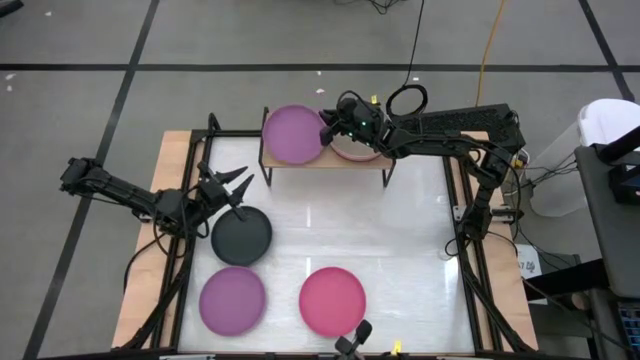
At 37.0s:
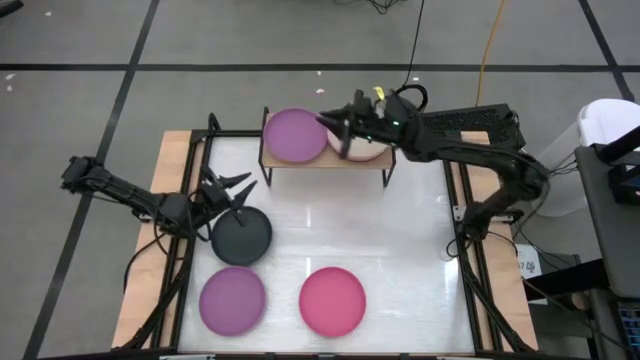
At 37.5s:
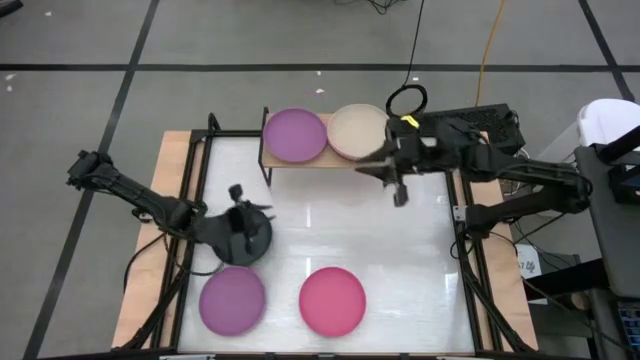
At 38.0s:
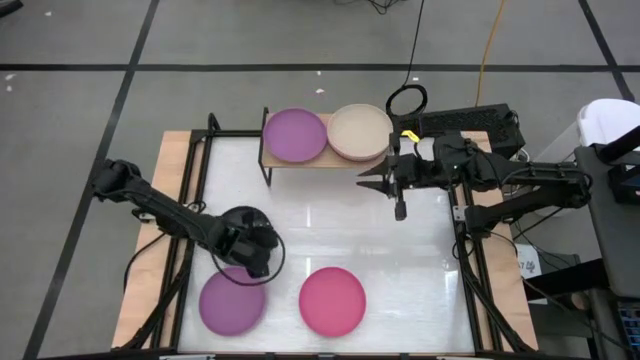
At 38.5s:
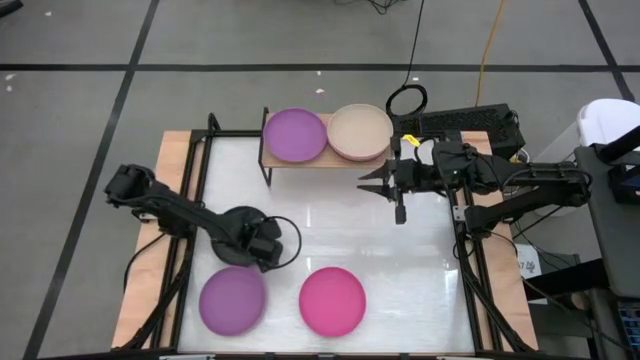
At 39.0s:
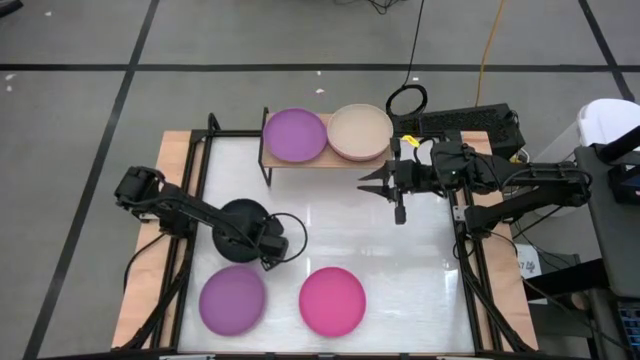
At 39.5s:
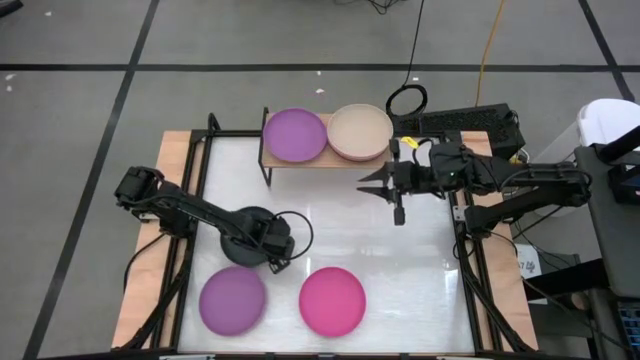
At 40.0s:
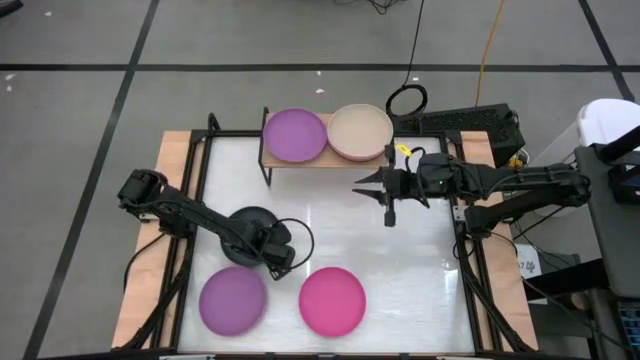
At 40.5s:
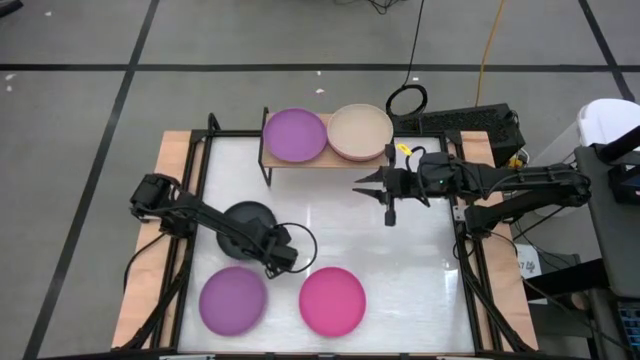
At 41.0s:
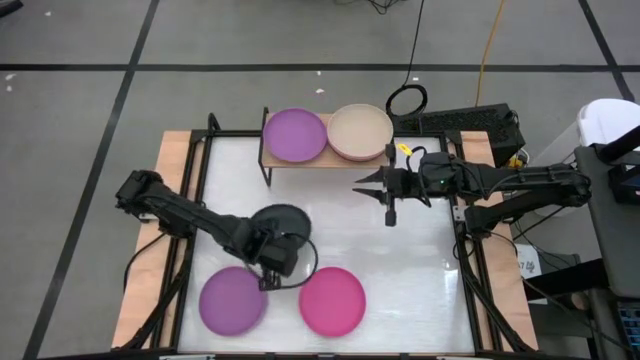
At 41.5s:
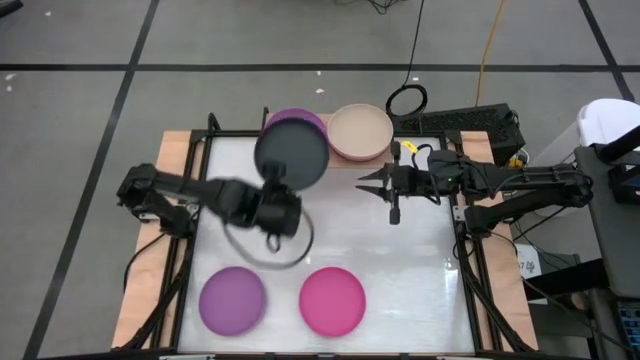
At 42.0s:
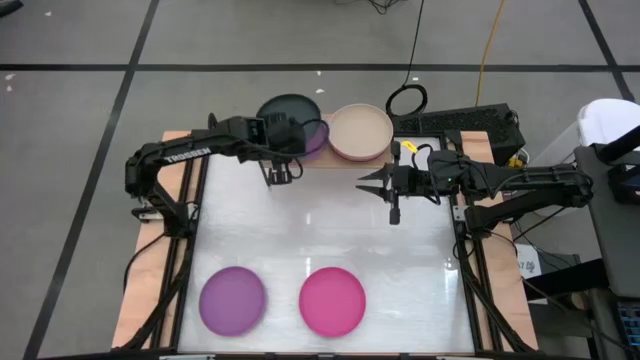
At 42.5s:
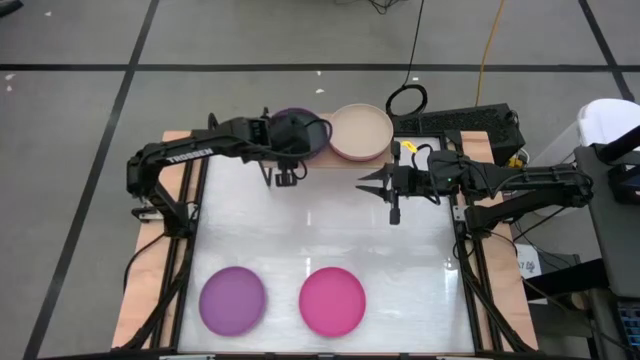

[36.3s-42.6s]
Task: Place and stack plates onto a shelf
Stack the black plate on top of the purple plate on the shelf

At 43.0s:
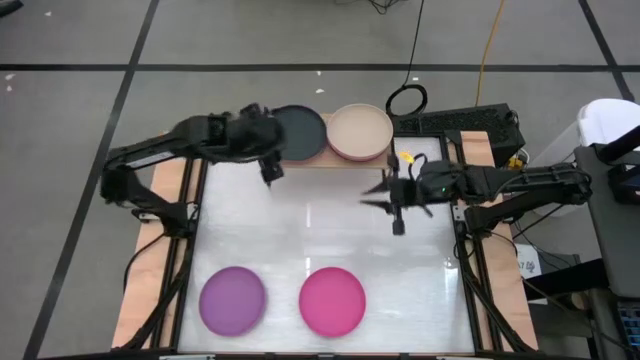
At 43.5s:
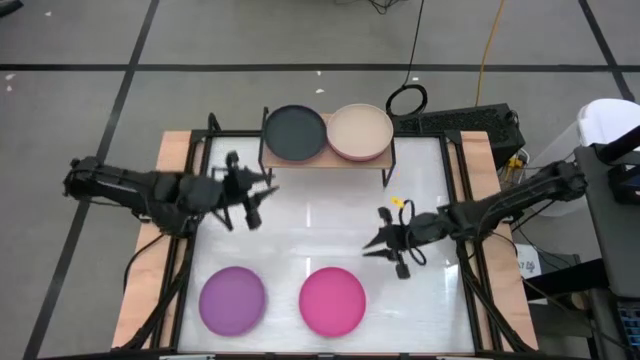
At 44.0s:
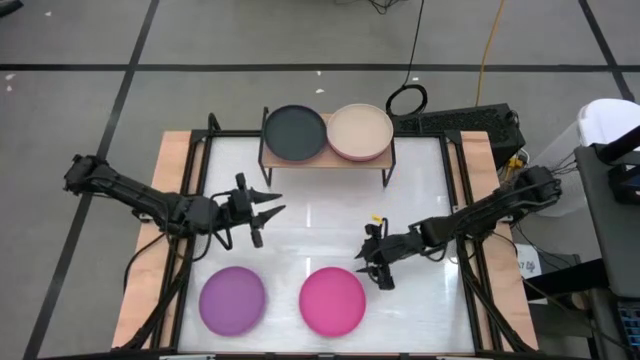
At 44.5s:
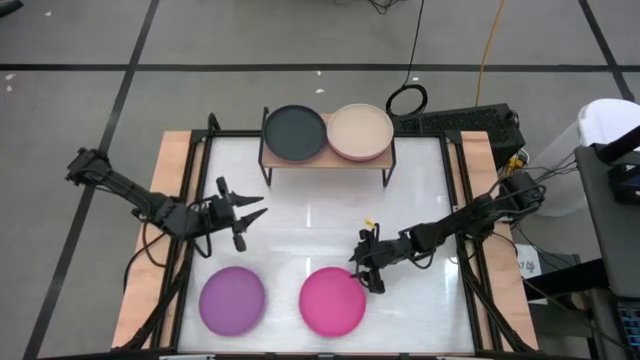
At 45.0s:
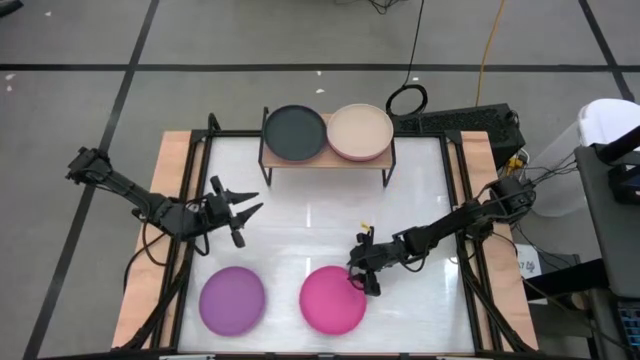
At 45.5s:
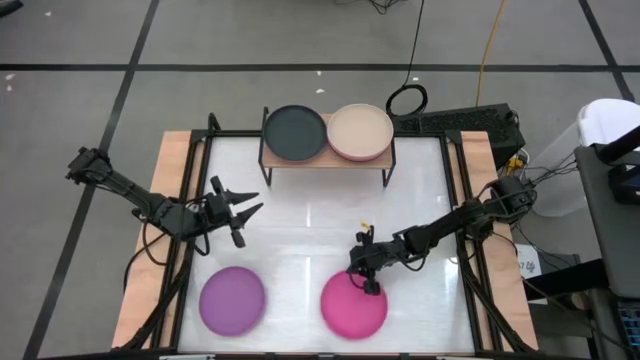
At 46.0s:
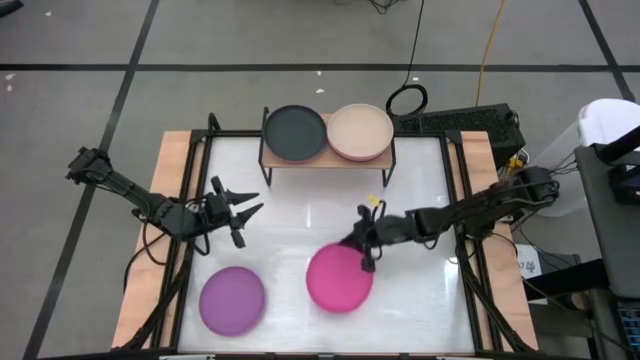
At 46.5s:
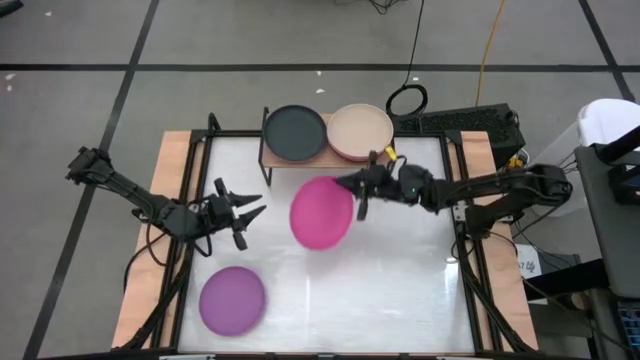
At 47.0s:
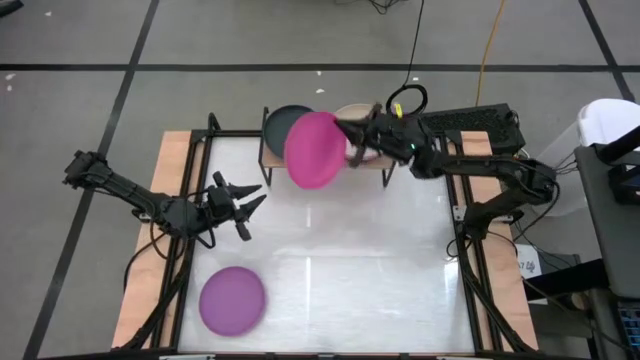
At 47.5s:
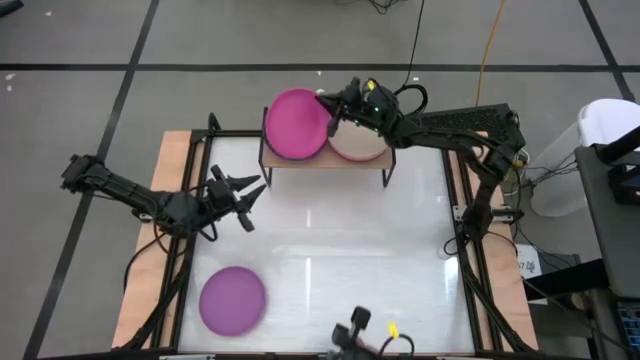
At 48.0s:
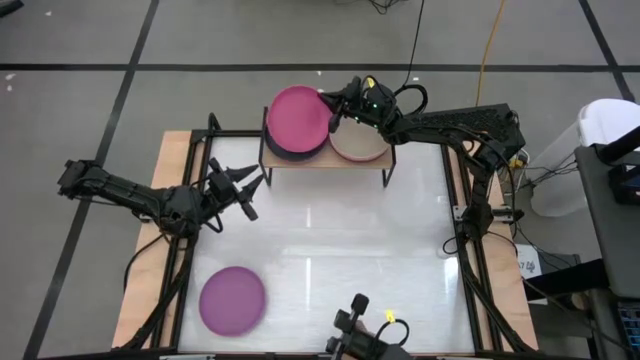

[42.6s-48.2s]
Stack the pink plate on top of the black plate on the shelf

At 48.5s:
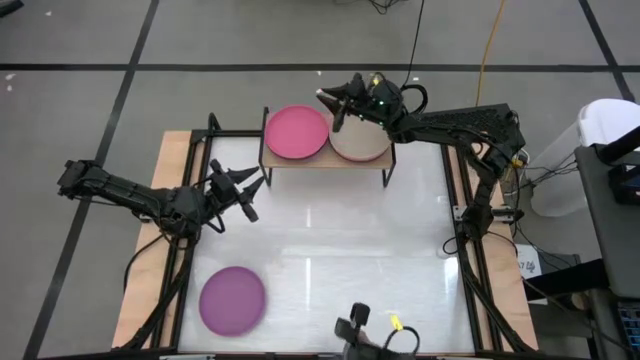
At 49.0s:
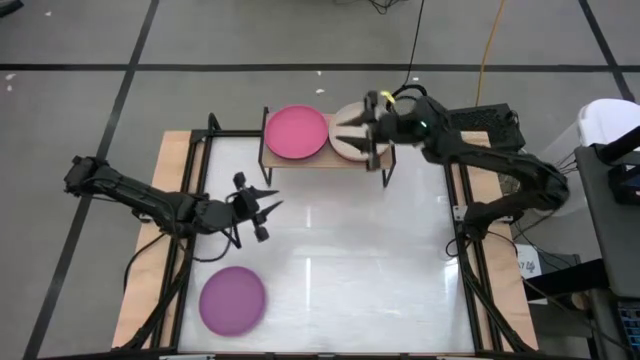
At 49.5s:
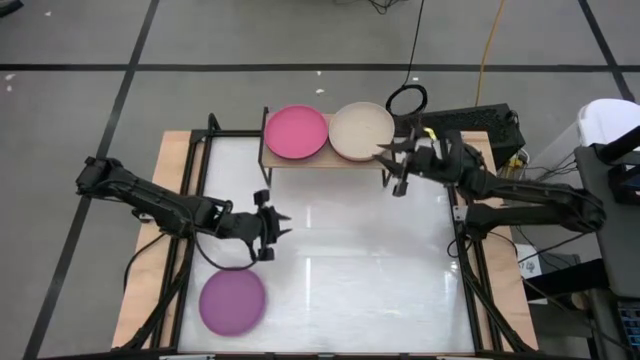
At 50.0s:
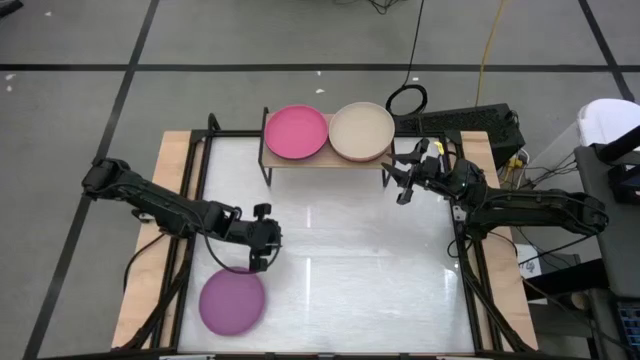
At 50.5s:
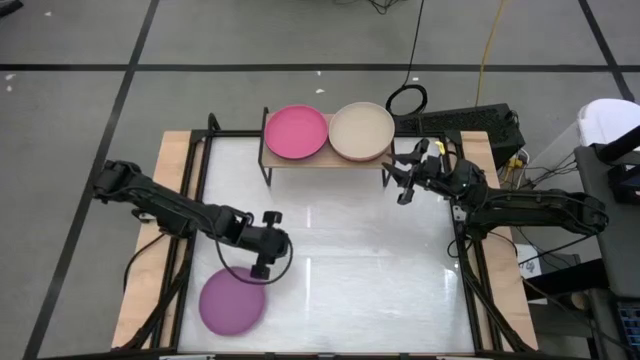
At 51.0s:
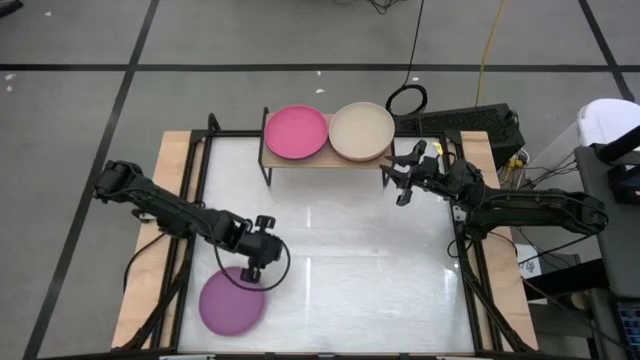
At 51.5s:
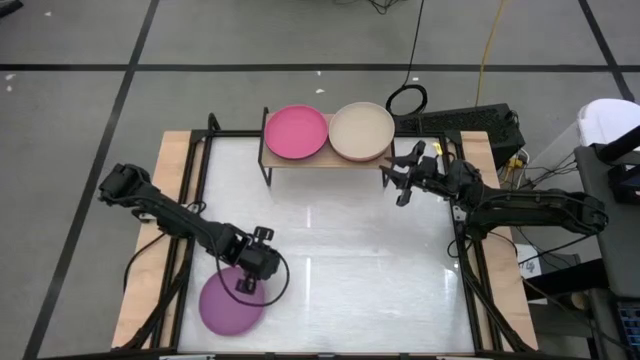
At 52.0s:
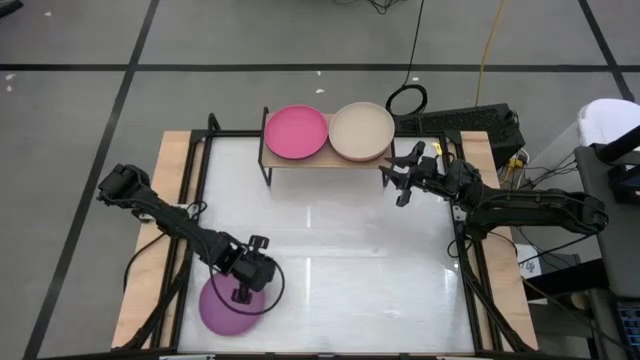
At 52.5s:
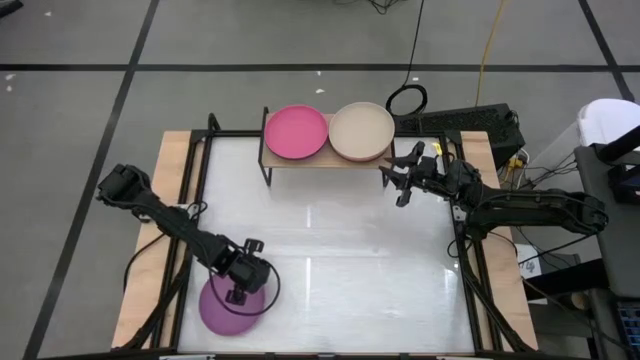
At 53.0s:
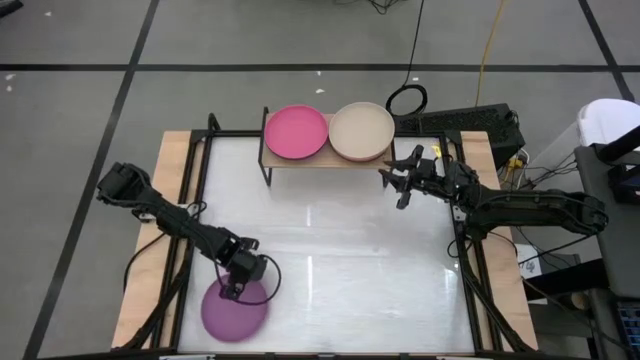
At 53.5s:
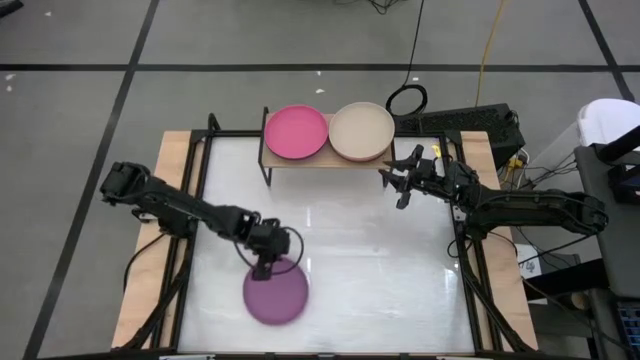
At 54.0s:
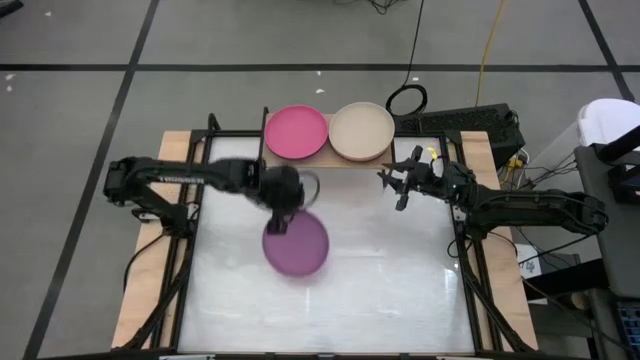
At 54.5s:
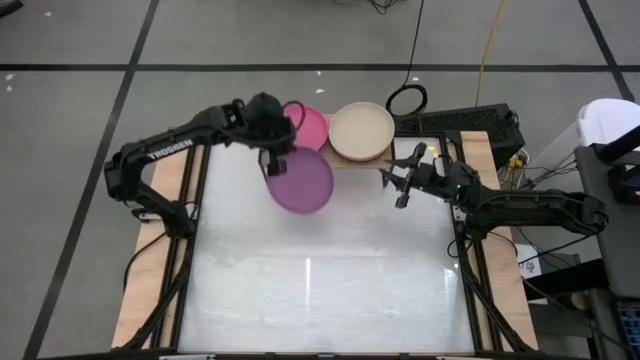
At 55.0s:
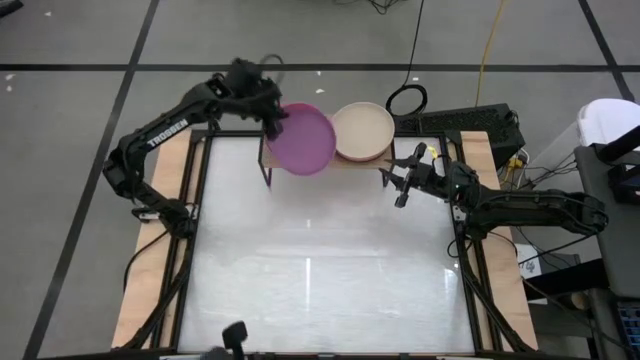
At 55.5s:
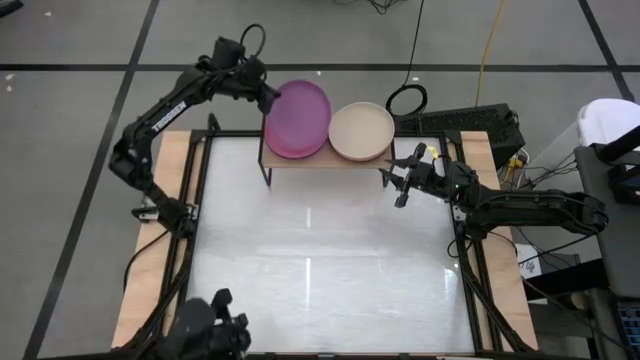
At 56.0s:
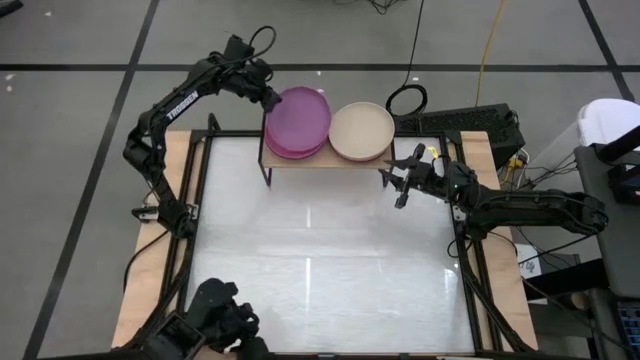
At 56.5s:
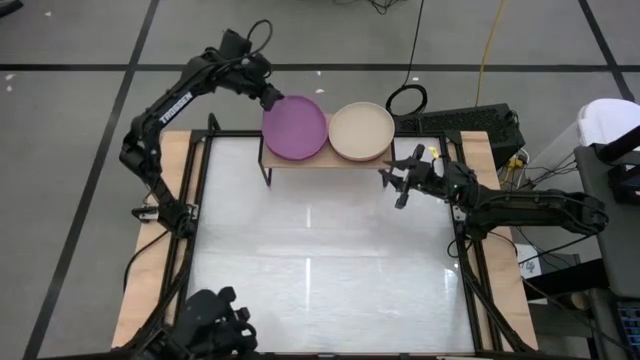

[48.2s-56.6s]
Stack the purple plate on top of the pink plate on the shelf
